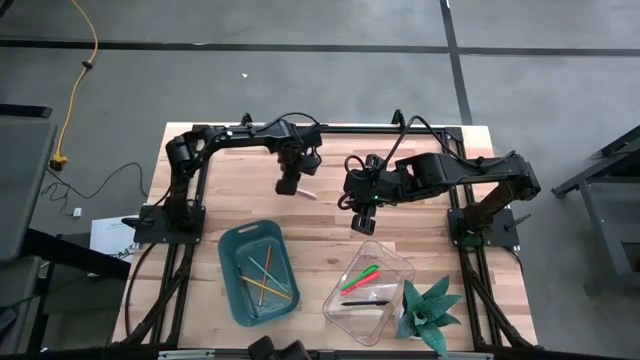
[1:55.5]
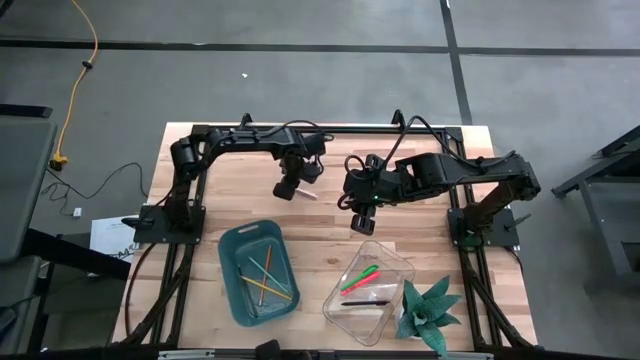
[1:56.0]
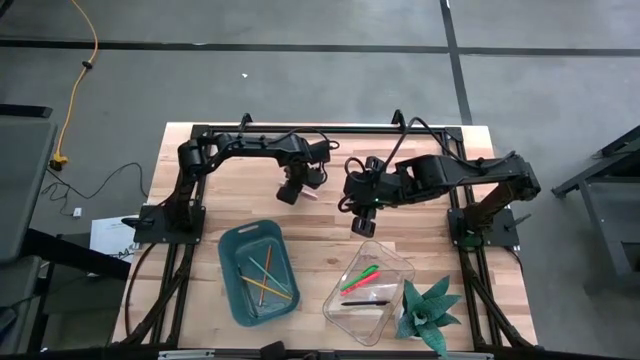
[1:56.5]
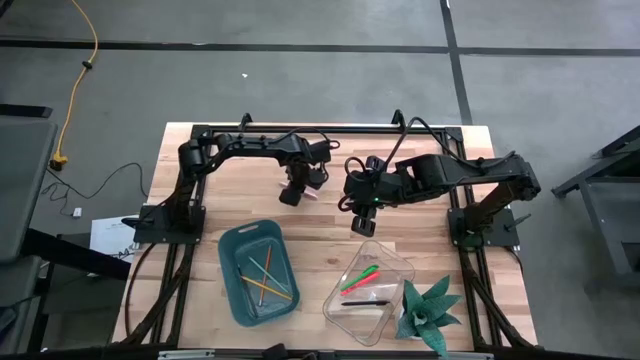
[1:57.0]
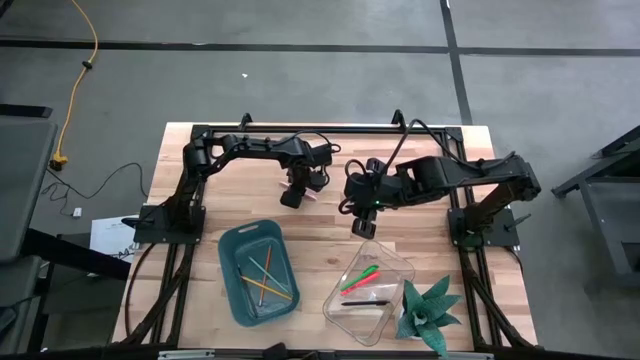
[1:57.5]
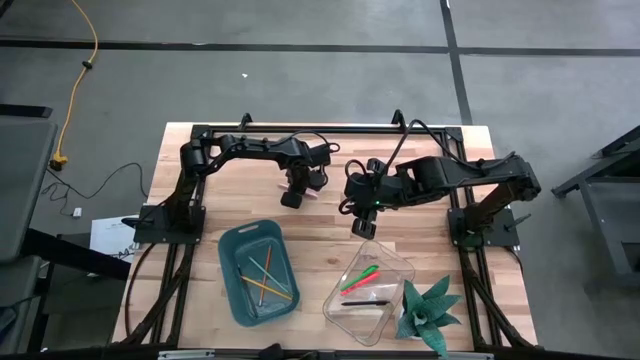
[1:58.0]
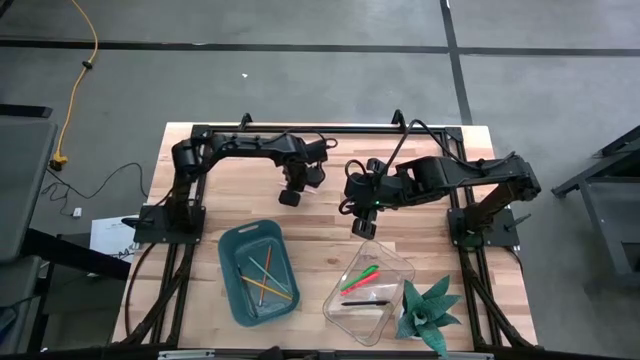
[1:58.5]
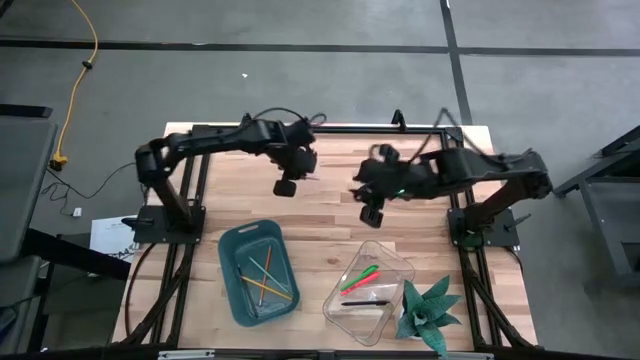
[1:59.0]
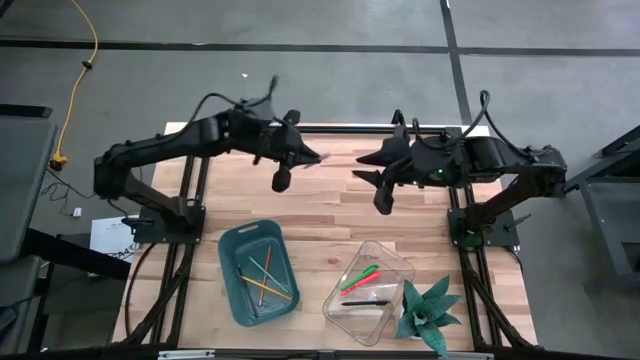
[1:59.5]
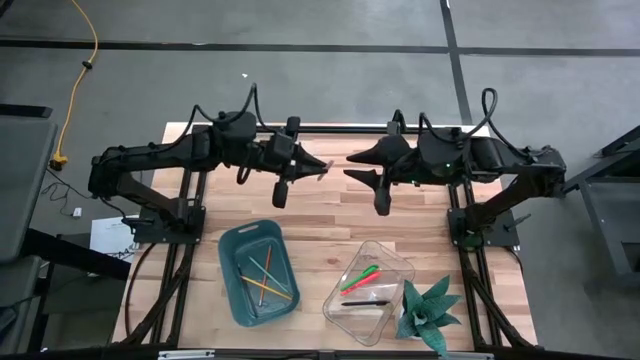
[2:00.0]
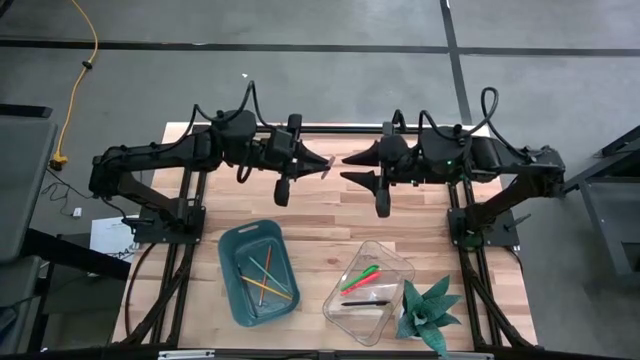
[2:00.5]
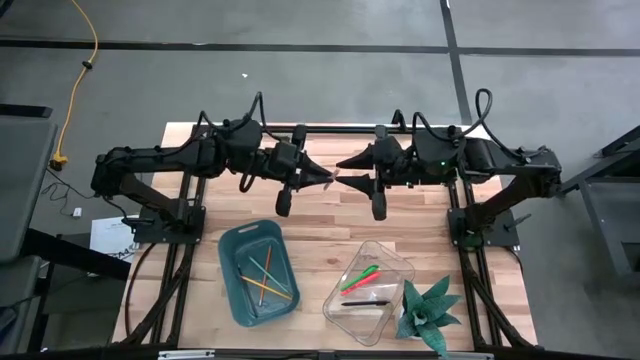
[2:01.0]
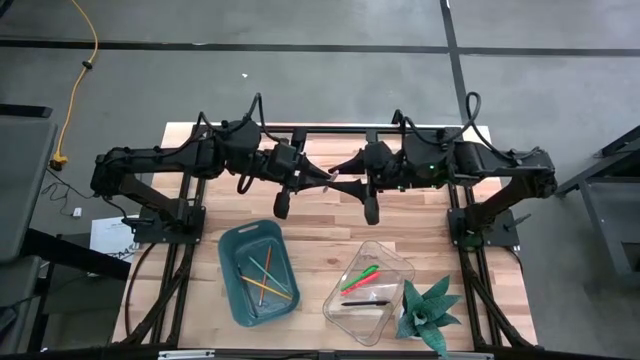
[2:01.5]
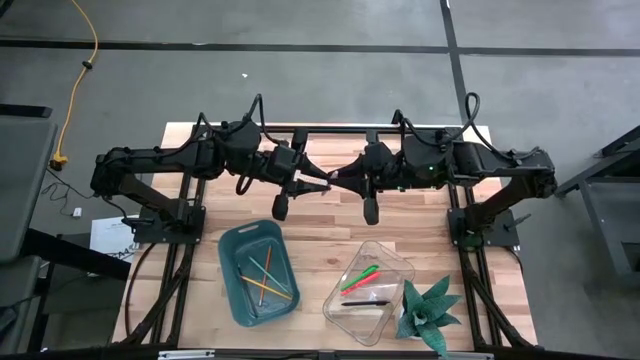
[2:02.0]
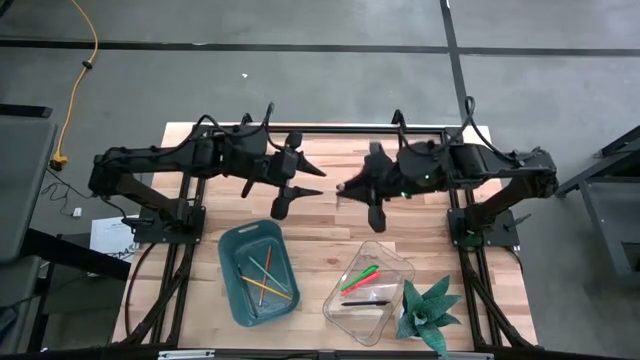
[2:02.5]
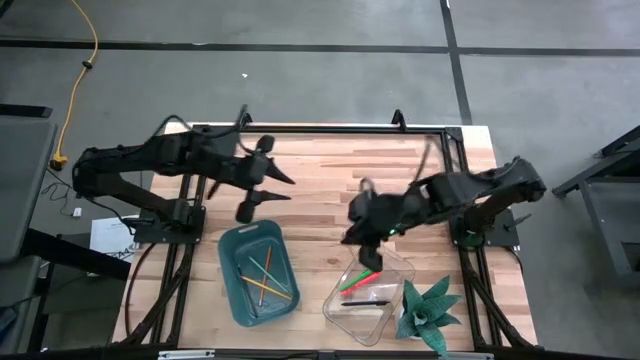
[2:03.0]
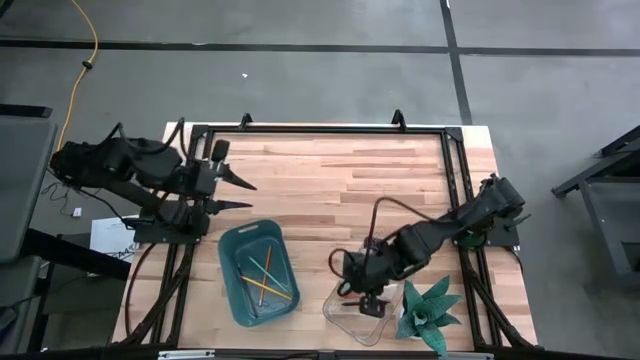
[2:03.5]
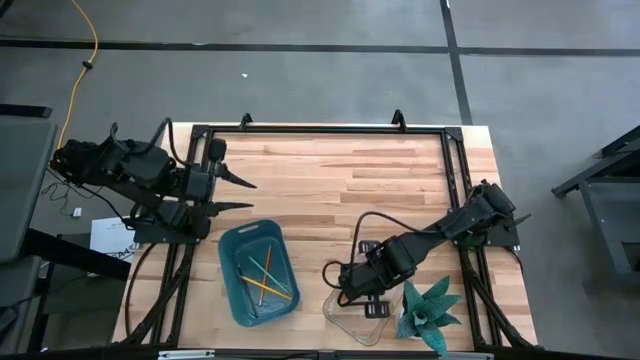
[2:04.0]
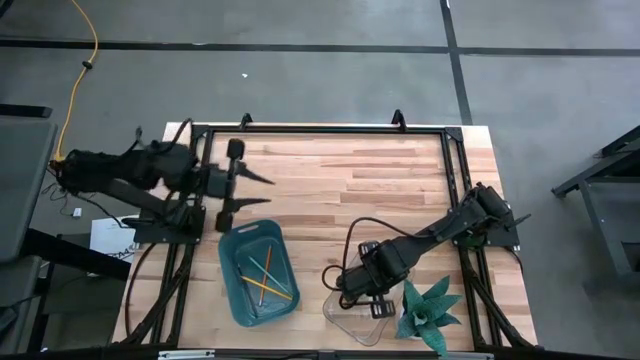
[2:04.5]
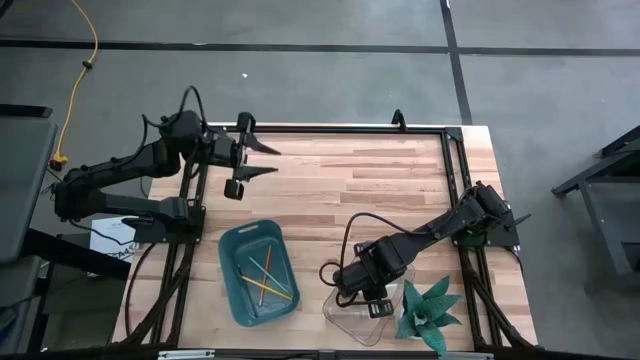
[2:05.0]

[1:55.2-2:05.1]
Task: Sort pens & pencils
Put the pink pen into the transparent bin

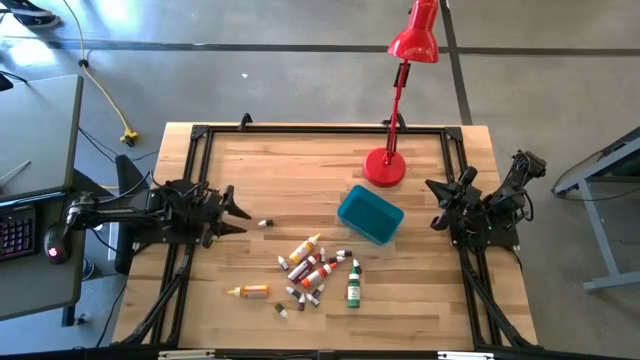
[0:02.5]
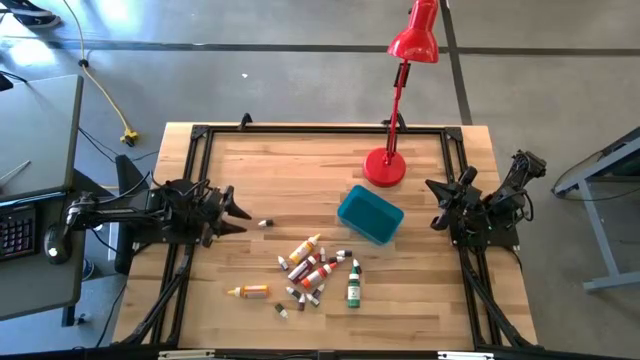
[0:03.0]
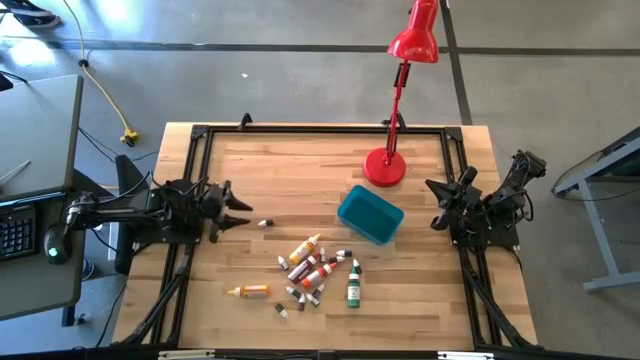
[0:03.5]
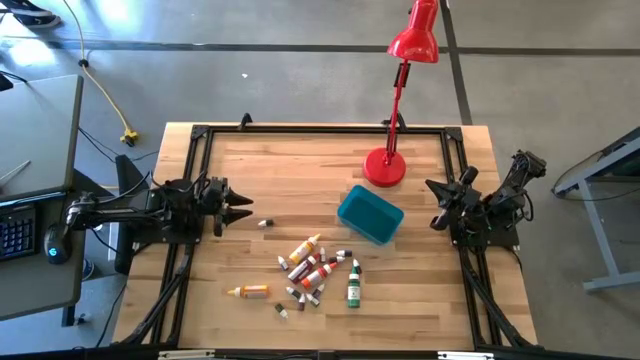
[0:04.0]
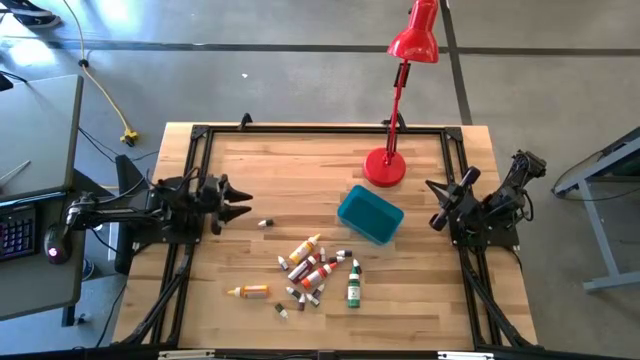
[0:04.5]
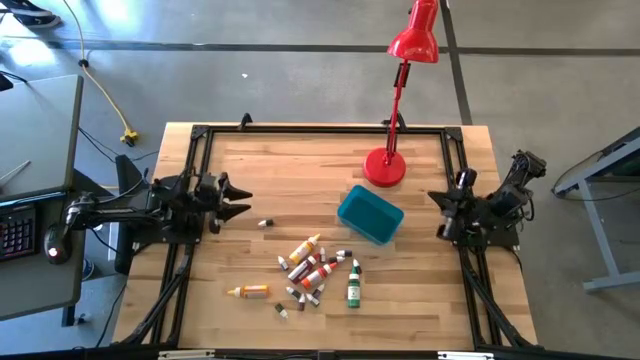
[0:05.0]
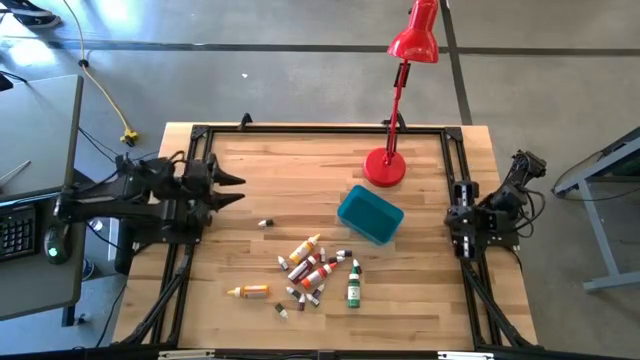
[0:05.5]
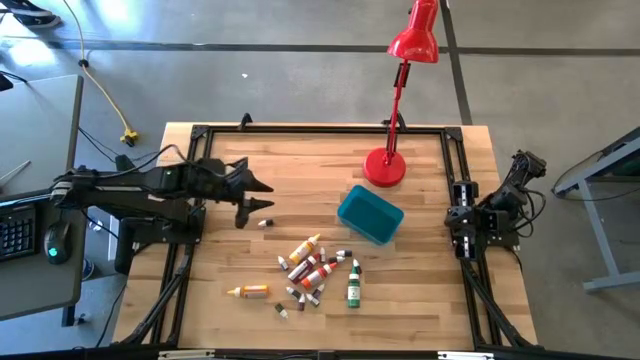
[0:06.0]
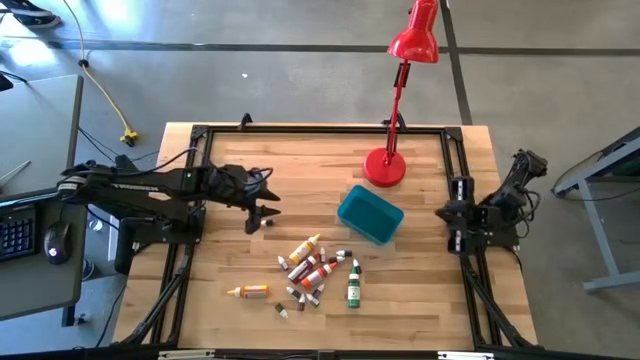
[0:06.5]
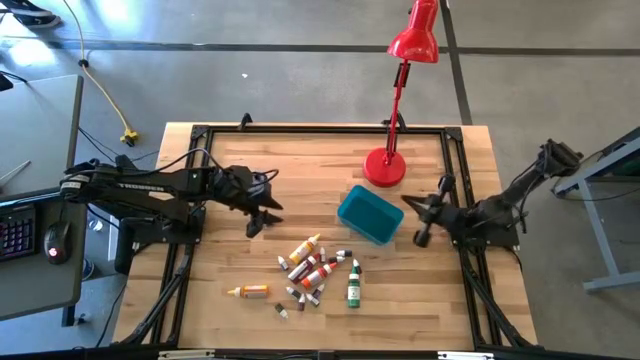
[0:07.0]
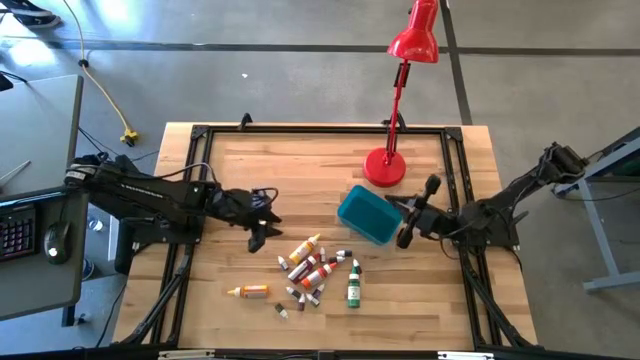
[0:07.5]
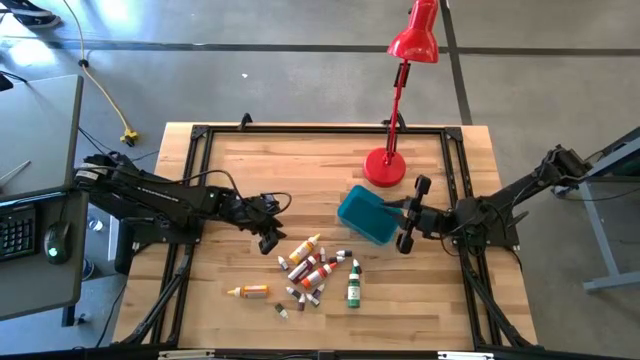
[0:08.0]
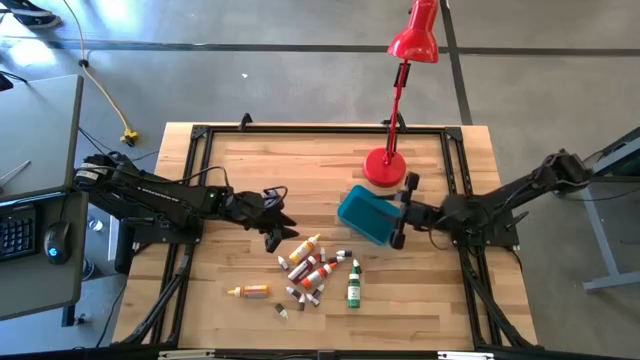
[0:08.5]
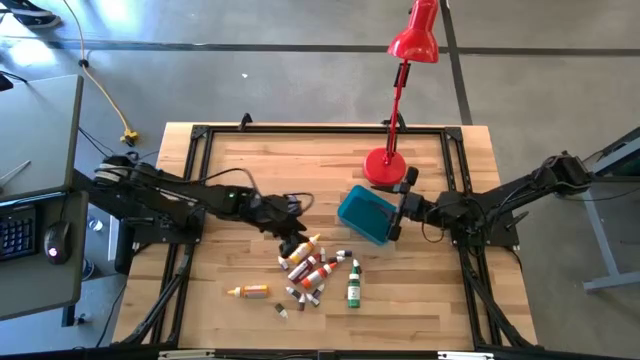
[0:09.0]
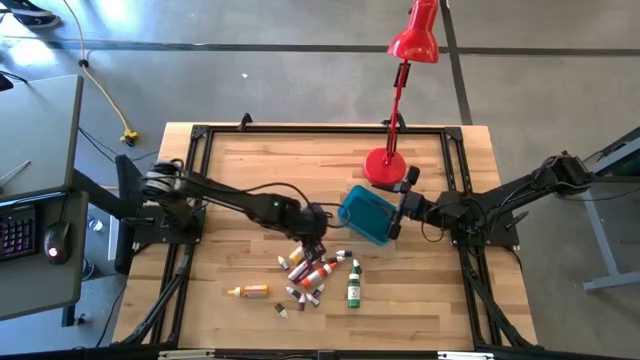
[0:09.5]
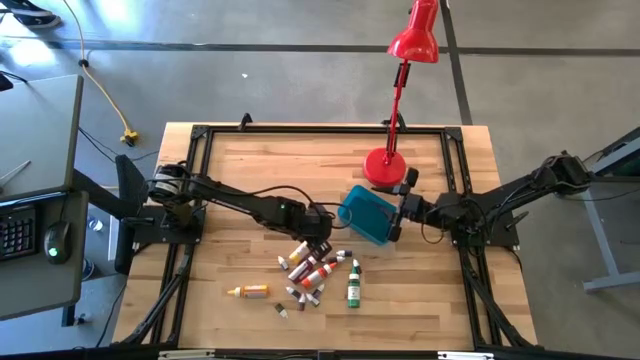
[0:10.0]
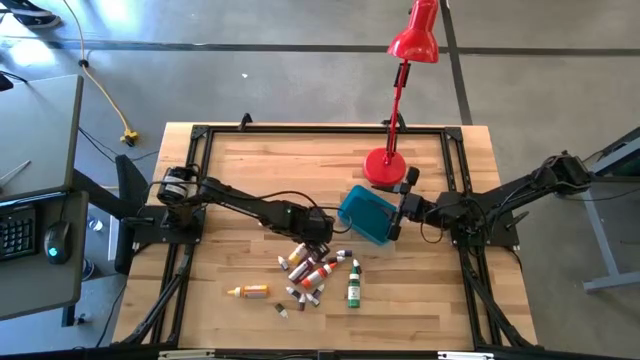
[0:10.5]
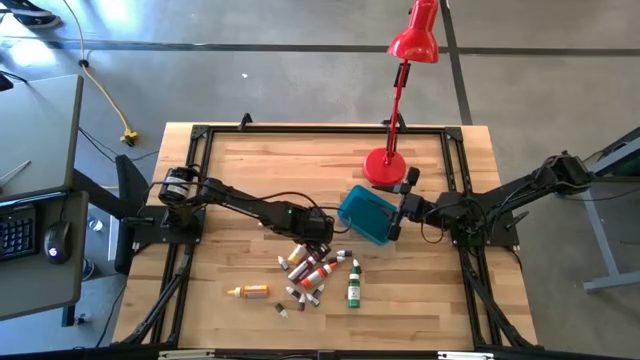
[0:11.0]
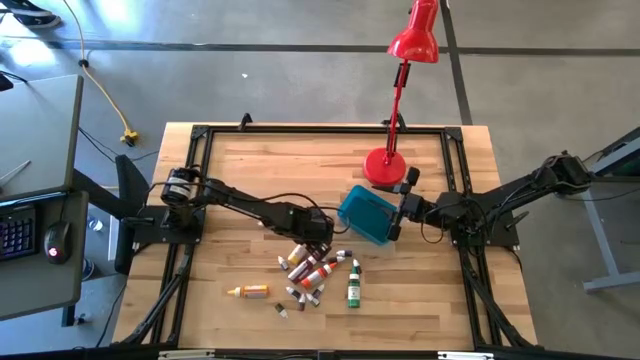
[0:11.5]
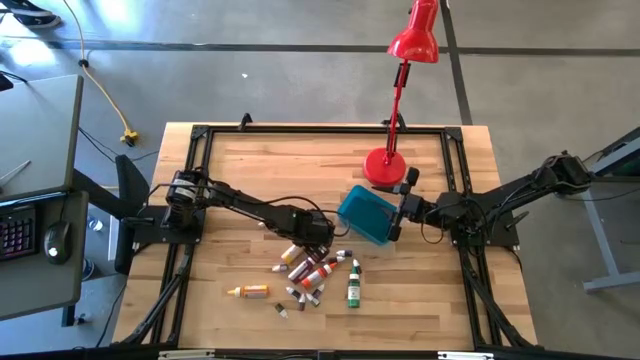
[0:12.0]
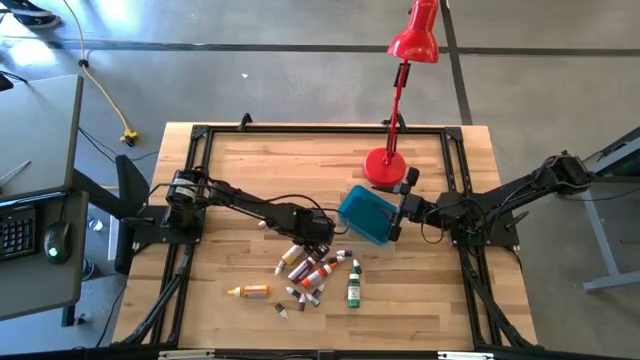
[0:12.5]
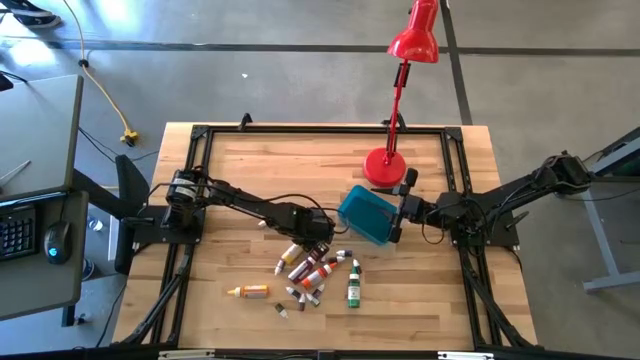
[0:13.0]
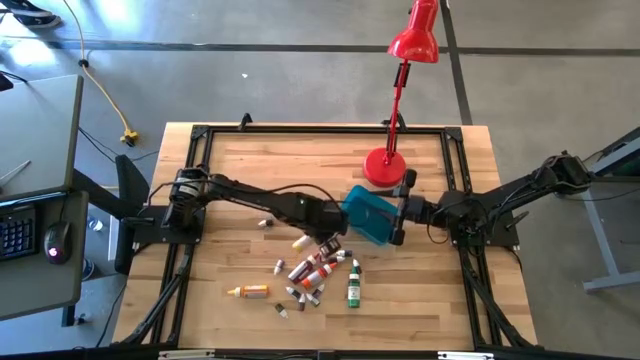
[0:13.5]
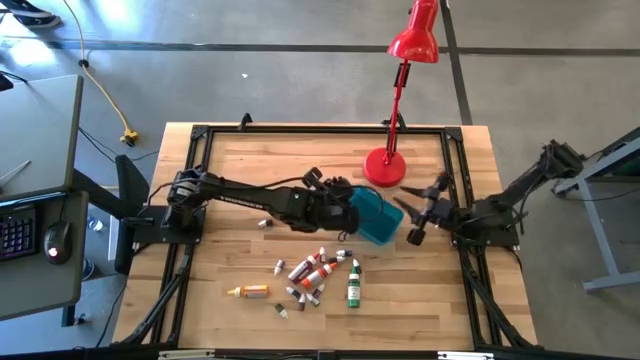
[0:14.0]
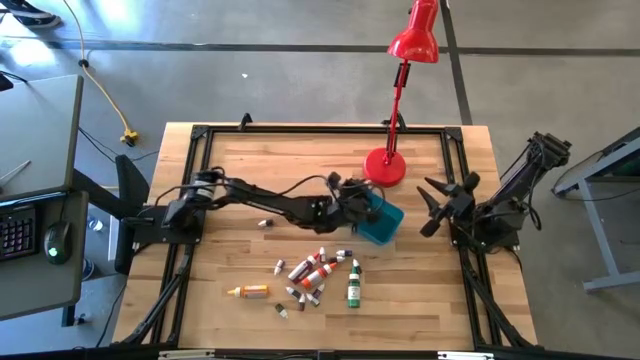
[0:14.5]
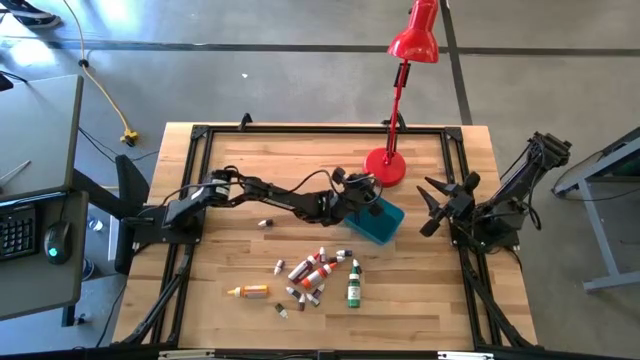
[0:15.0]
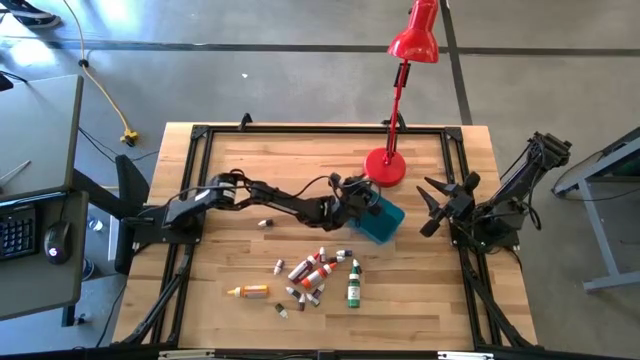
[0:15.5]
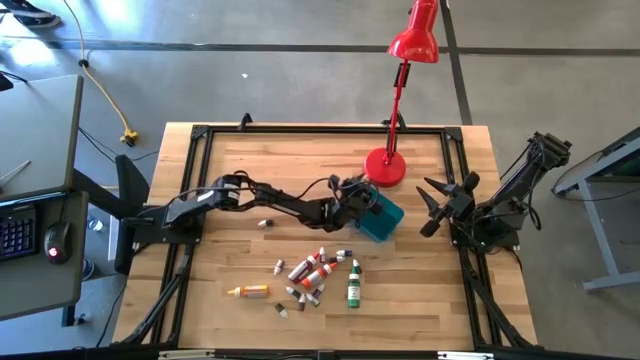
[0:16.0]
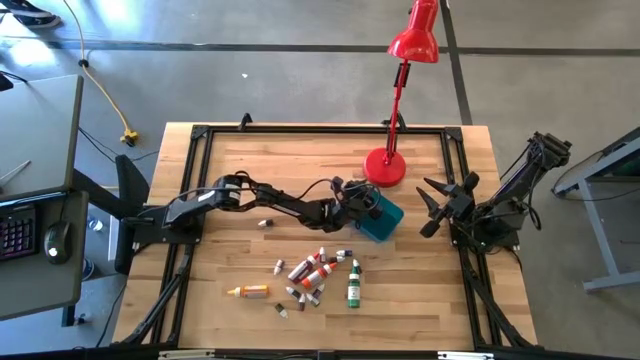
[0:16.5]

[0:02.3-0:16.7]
Task: Pick & Place food coloring
Put the big yellow food coloring bottle into the blue container
